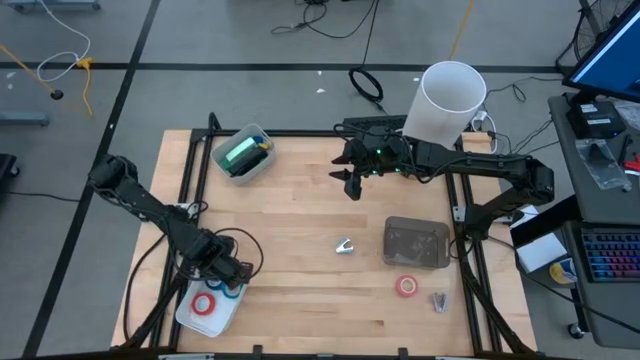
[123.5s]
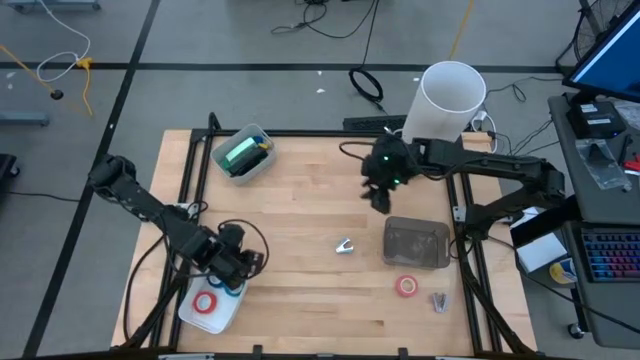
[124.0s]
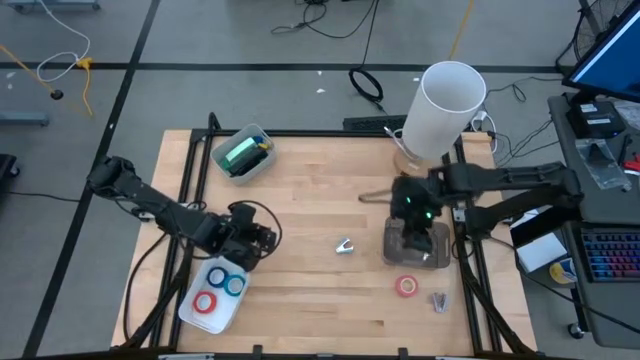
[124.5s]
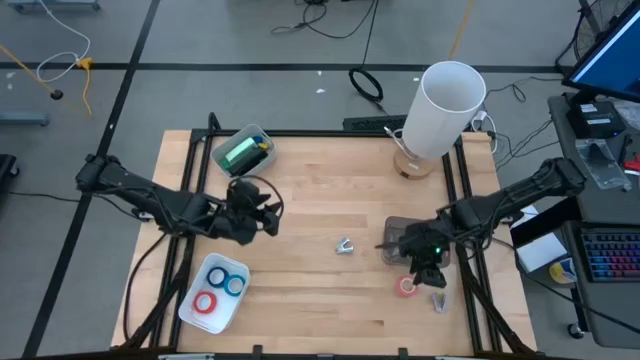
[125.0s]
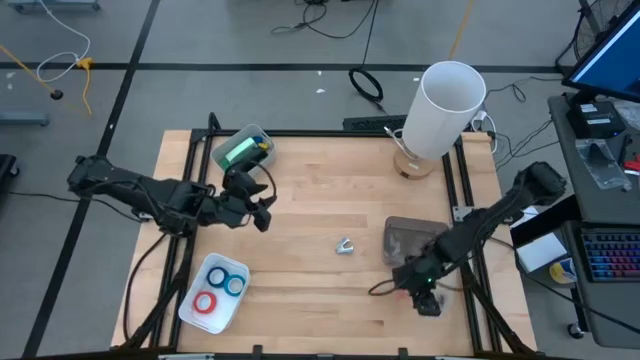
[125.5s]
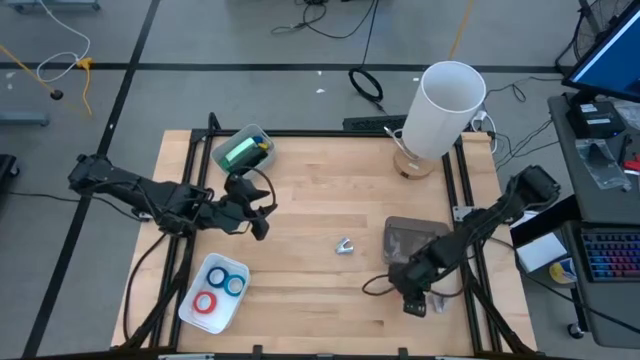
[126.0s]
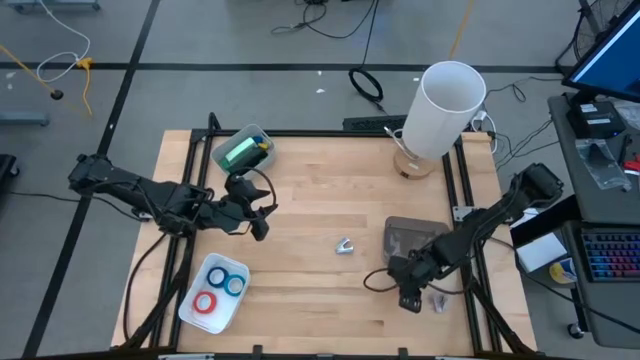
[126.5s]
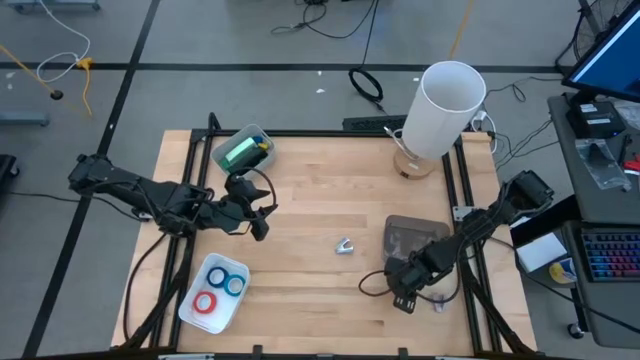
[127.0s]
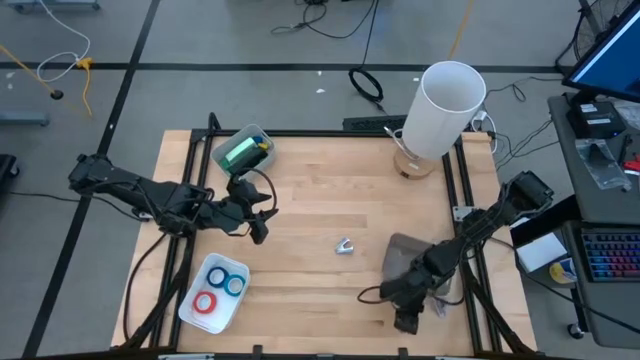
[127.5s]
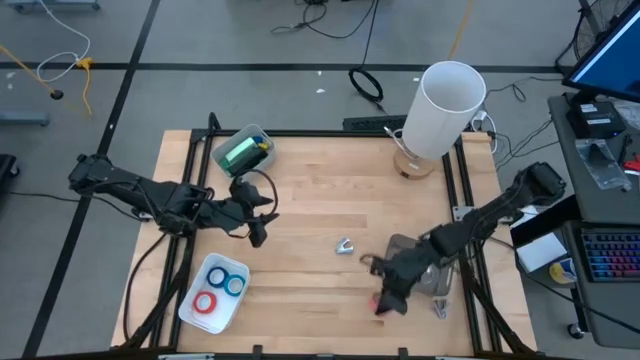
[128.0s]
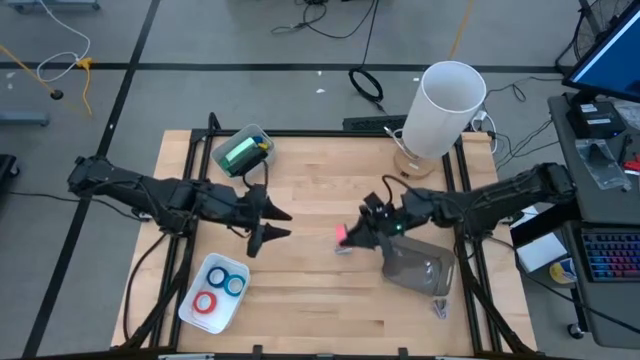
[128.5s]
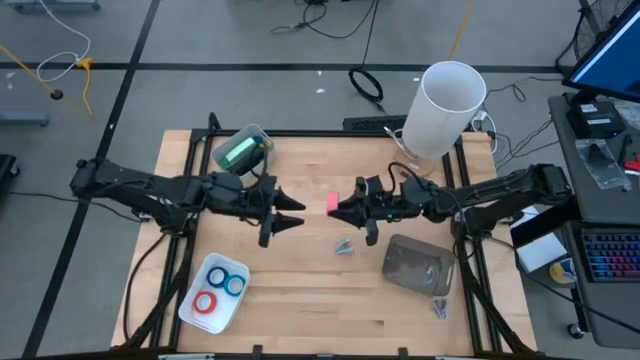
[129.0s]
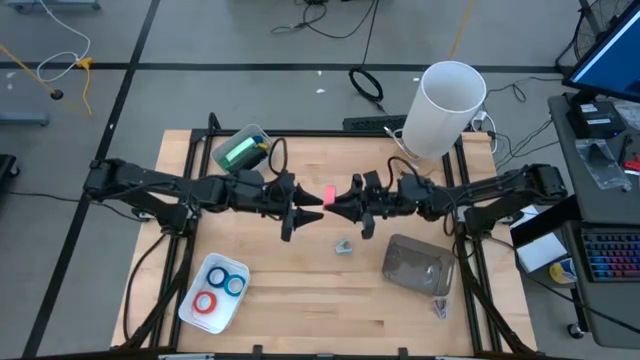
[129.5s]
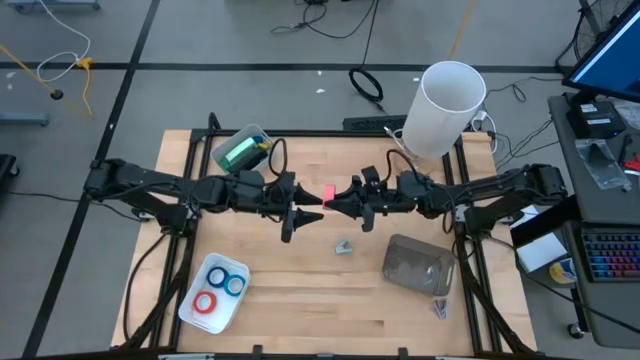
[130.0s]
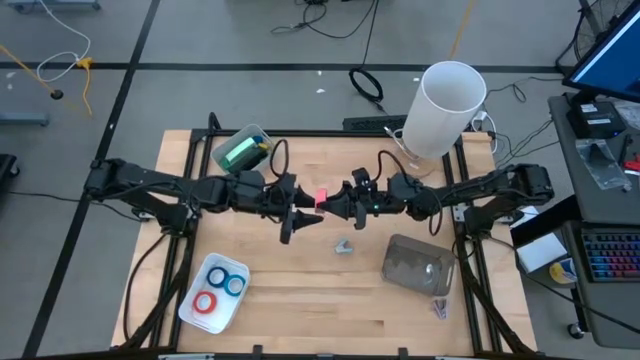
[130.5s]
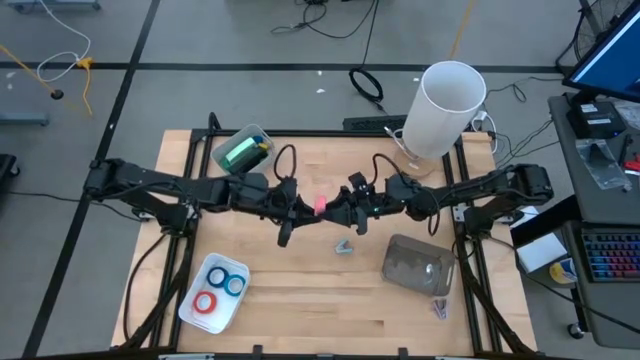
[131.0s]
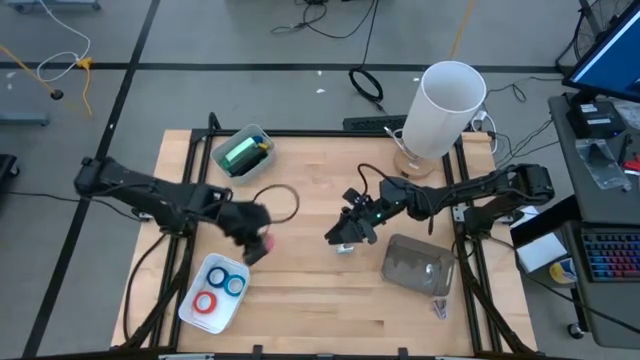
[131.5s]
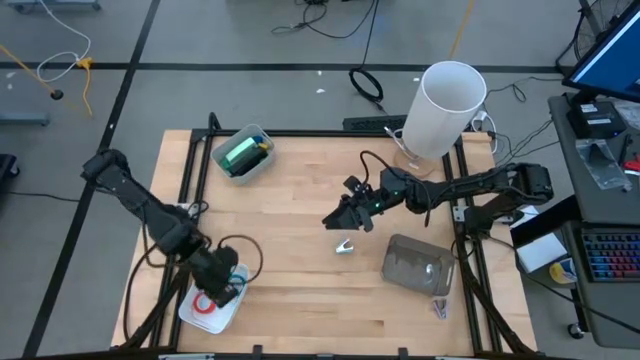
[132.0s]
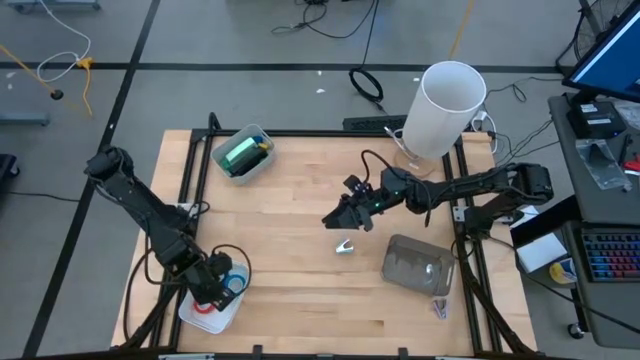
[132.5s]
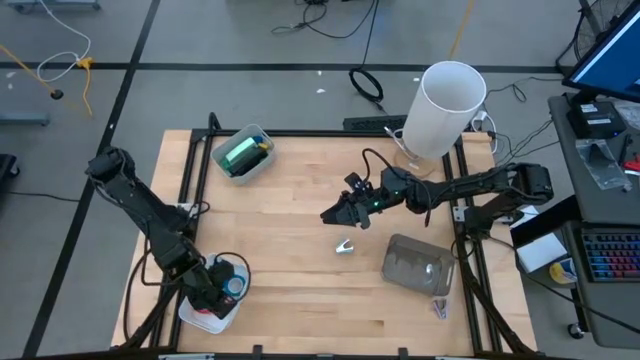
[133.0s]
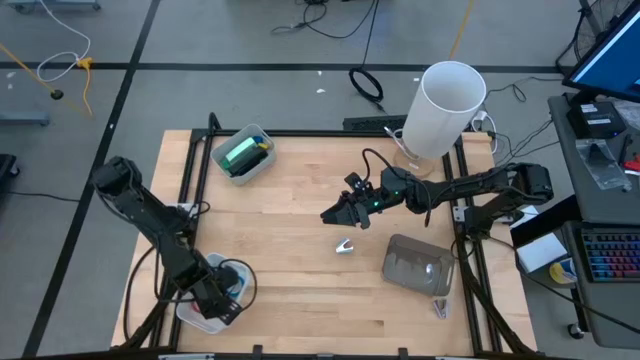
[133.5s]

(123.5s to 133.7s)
Task: Pick and place Stapler, Stapler remover, tape
Put the pink tape into the white bin

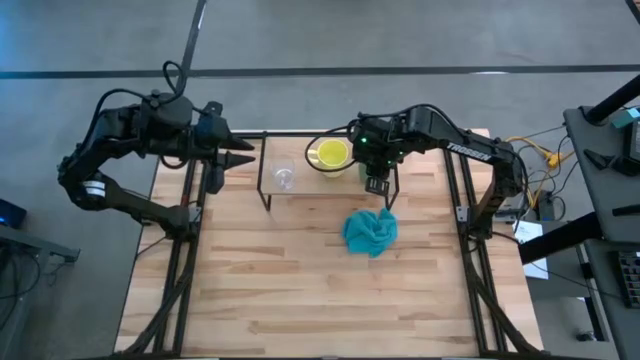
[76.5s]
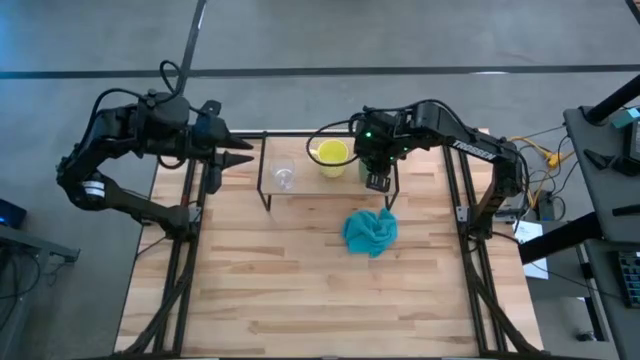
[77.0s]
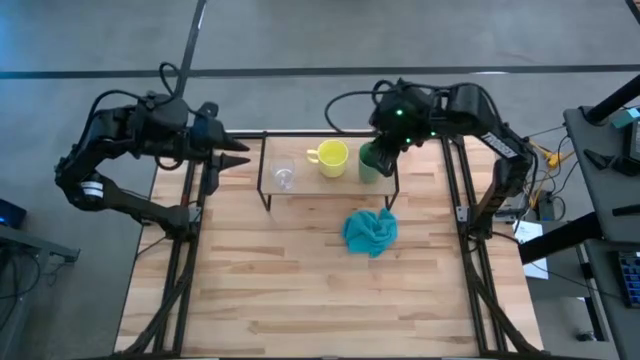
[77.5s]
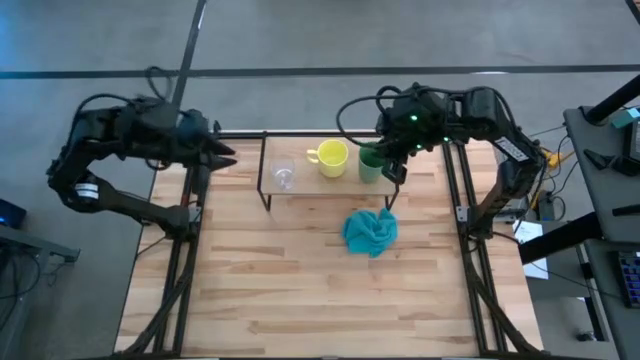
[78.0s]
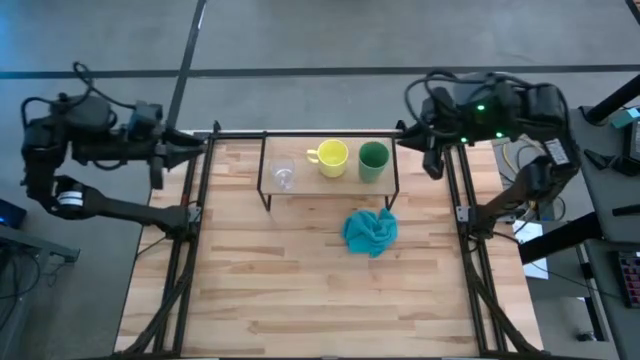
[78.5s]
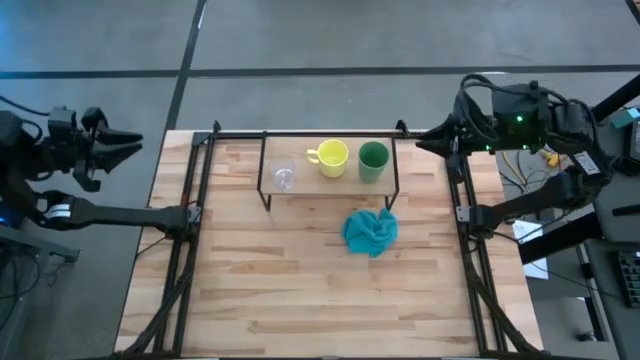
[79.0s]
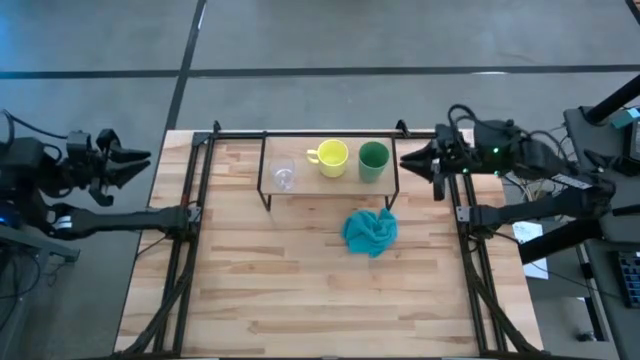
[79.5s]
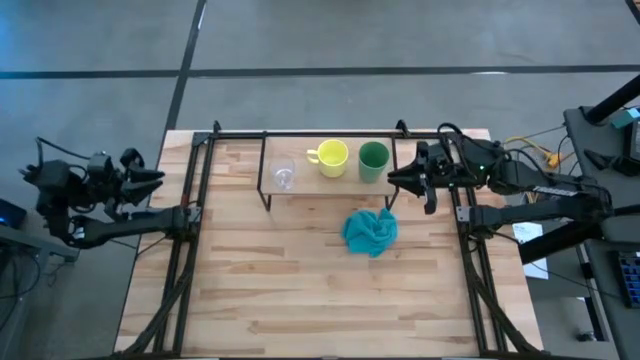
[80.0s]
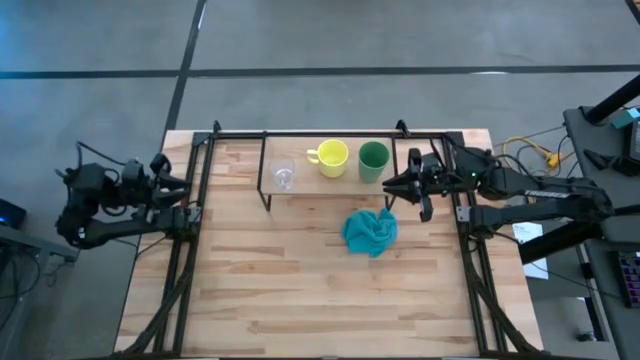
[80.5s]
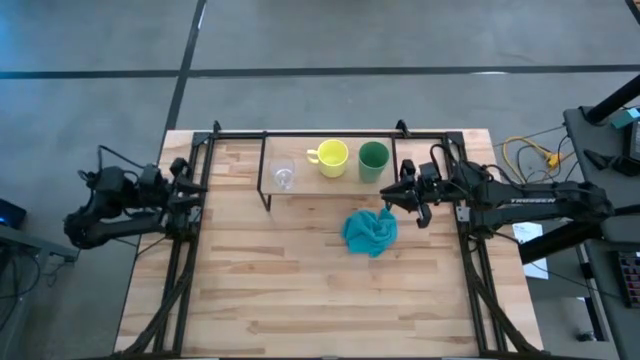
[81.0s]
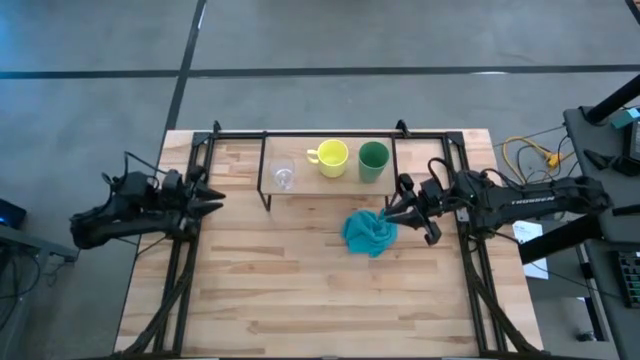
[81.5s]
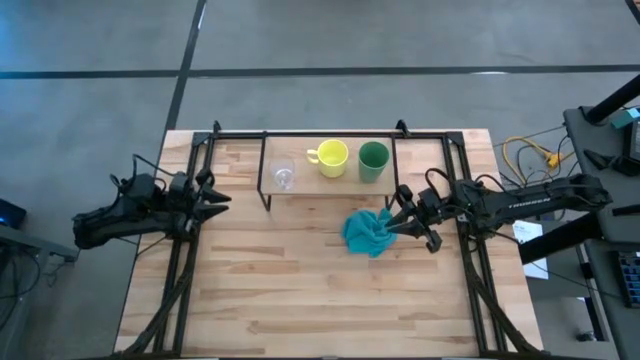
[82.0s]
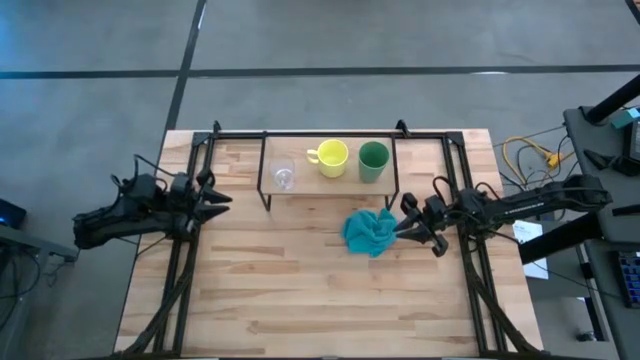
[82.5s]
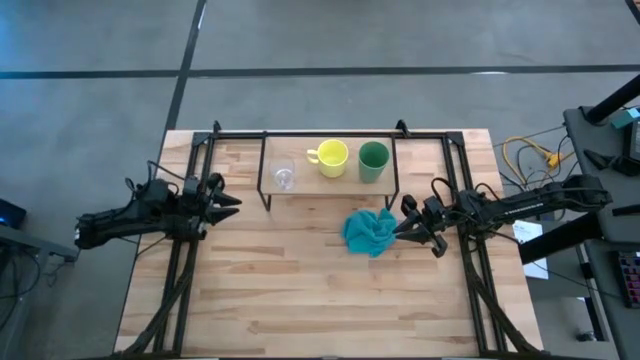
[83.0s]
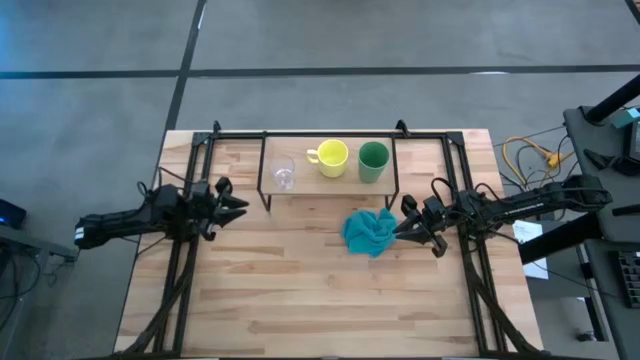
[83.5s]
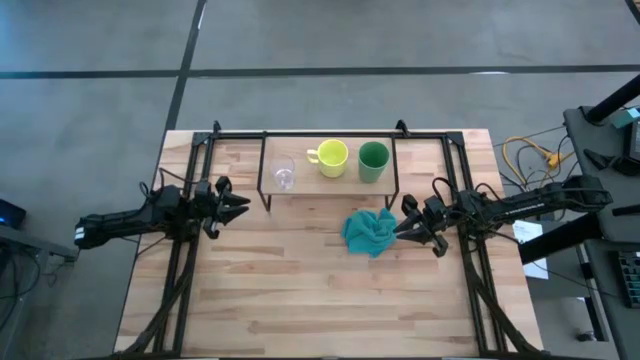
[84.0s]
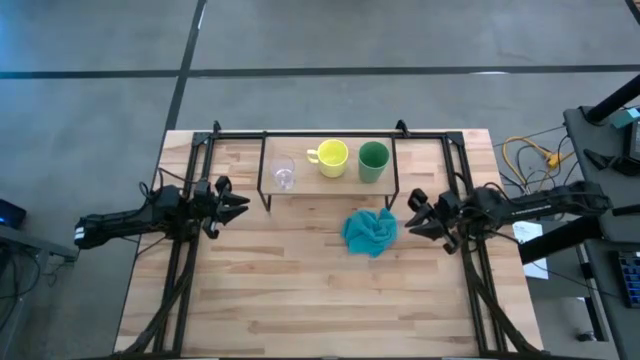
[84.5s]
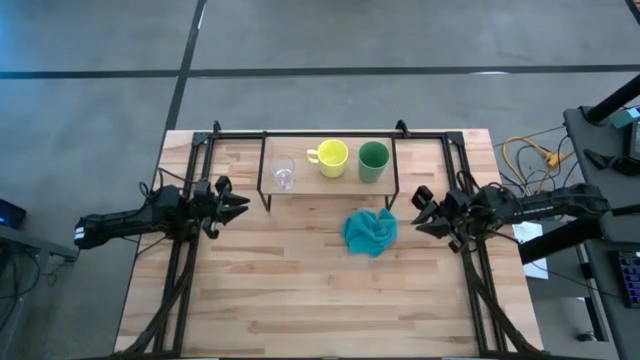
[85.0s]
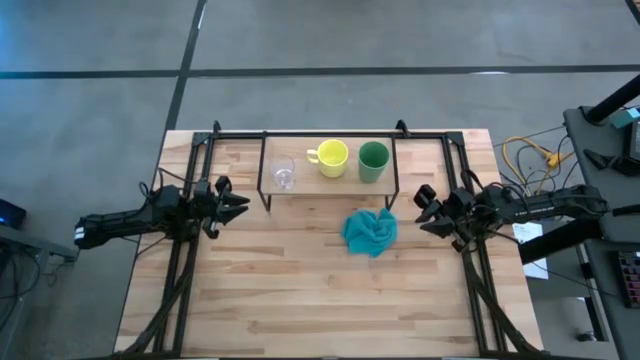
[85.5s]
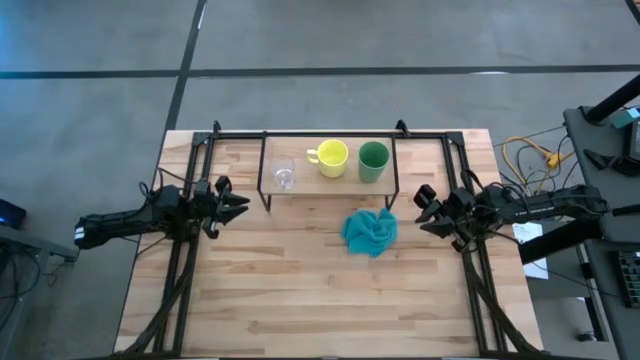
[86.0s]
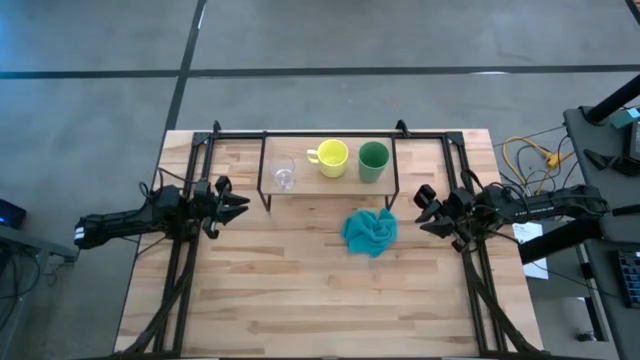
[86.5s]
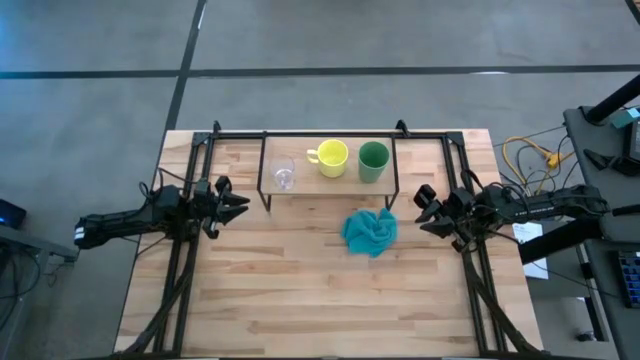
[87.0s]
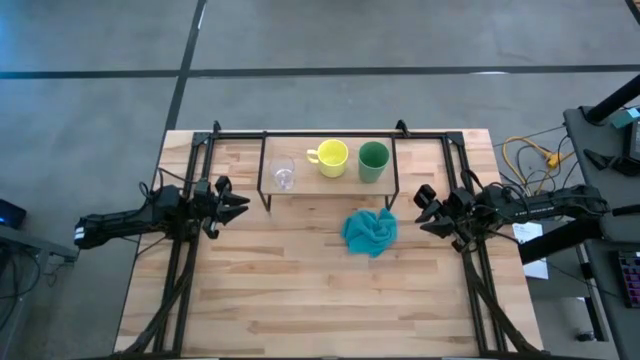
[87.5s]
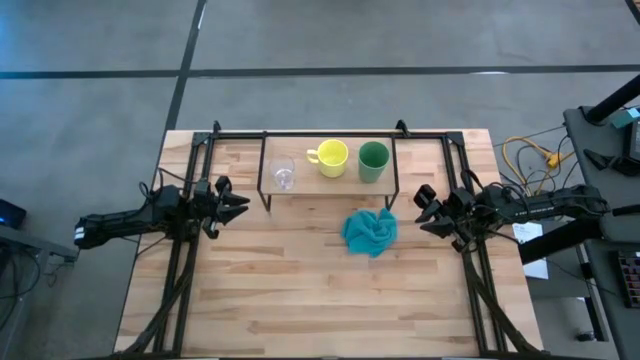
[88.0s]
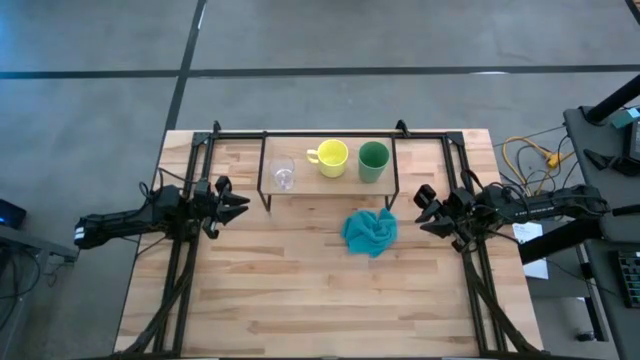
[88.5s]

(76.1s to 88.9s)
Task: Stack small to large cups/mugs on shelf
Return to Home Position
